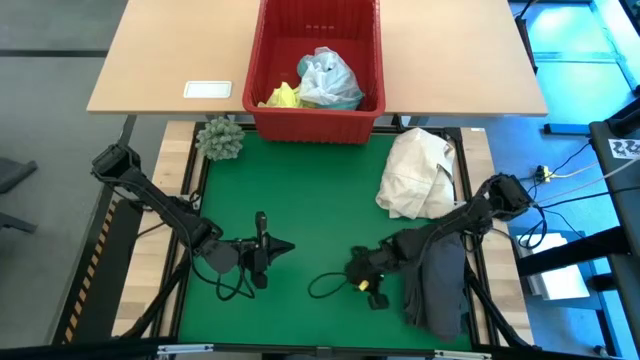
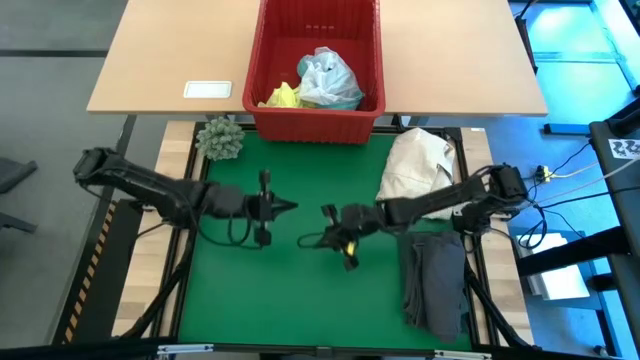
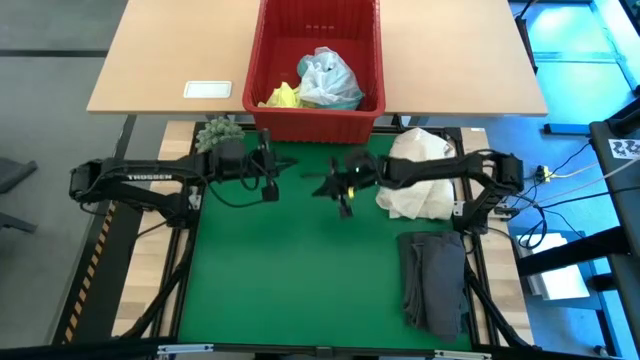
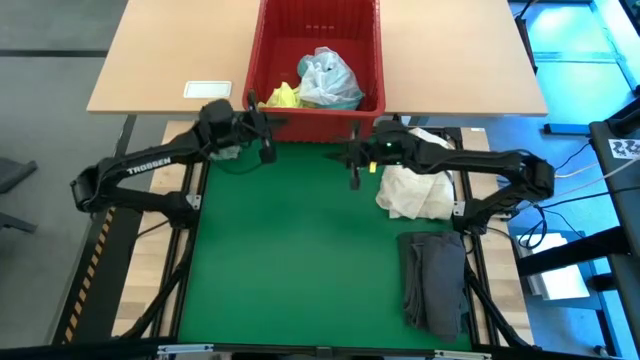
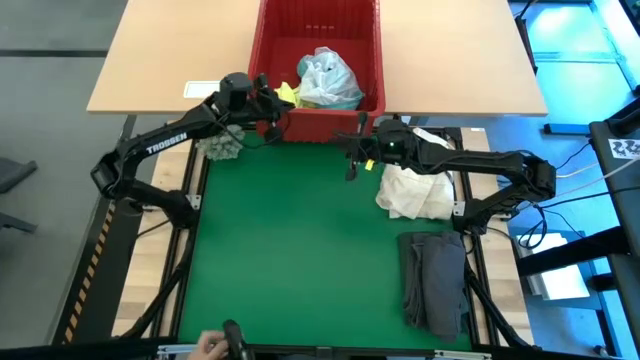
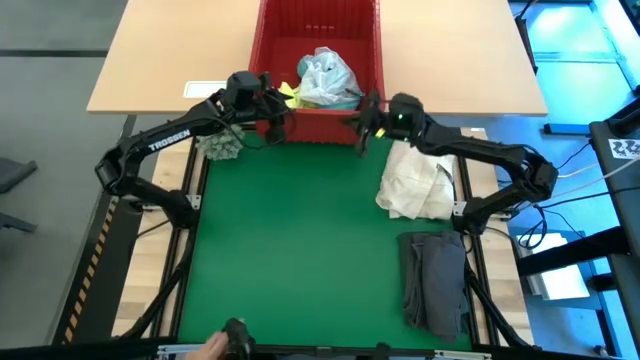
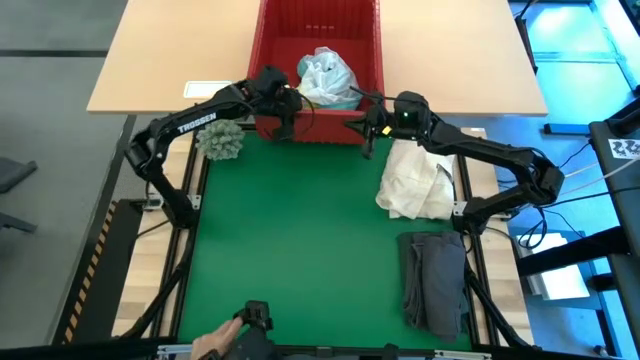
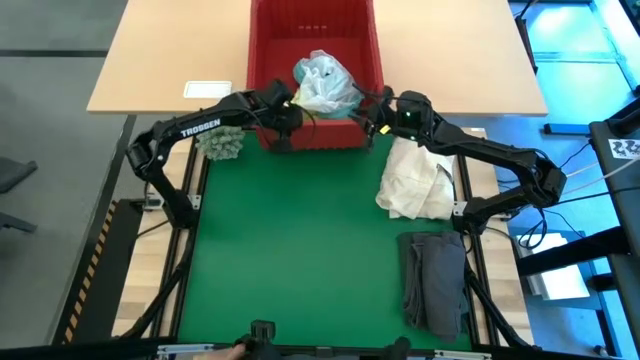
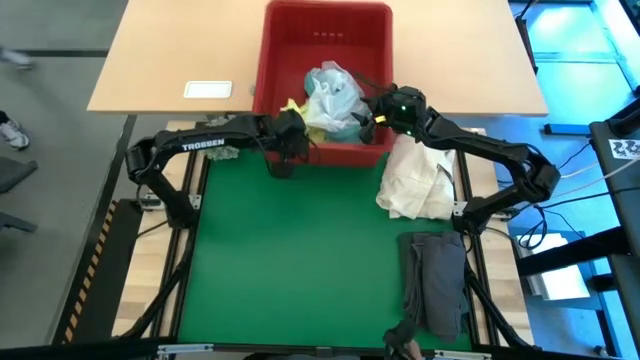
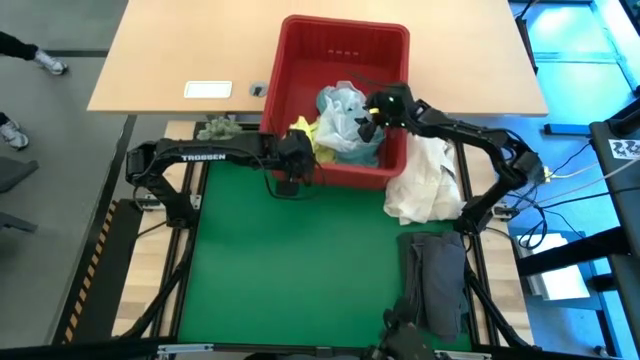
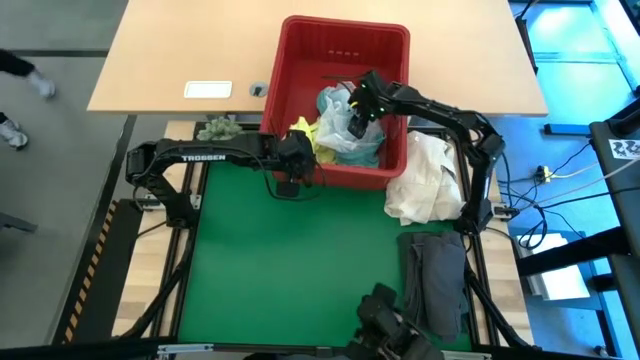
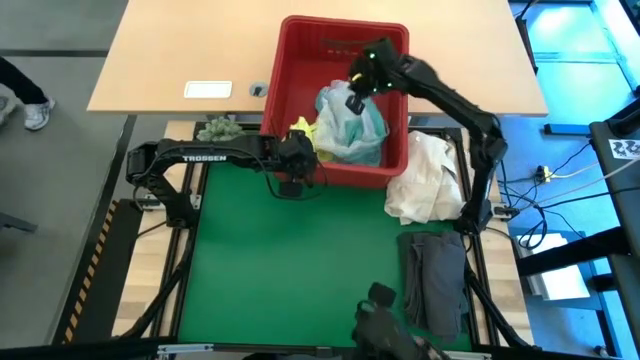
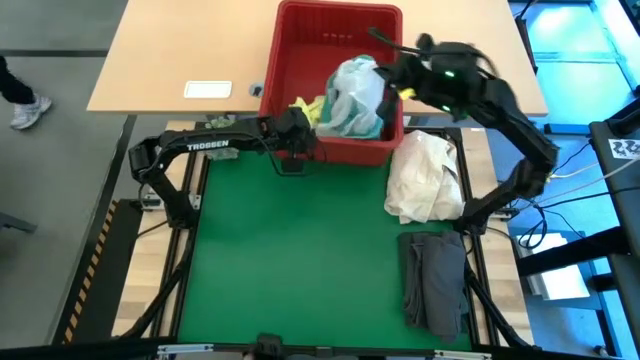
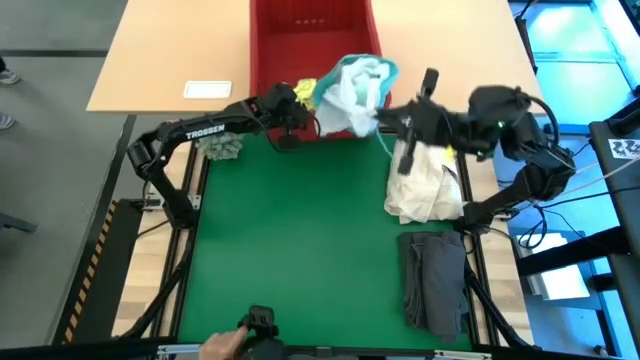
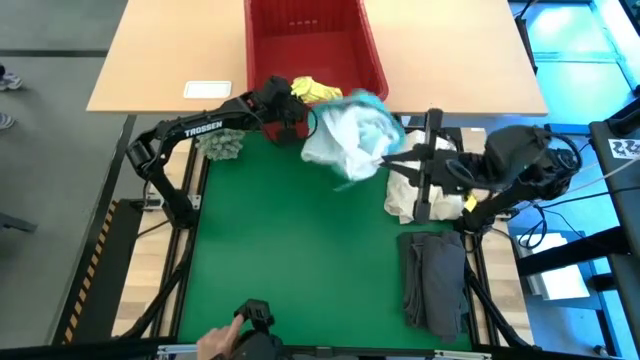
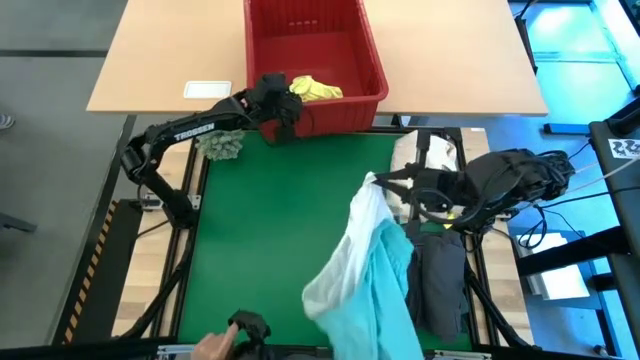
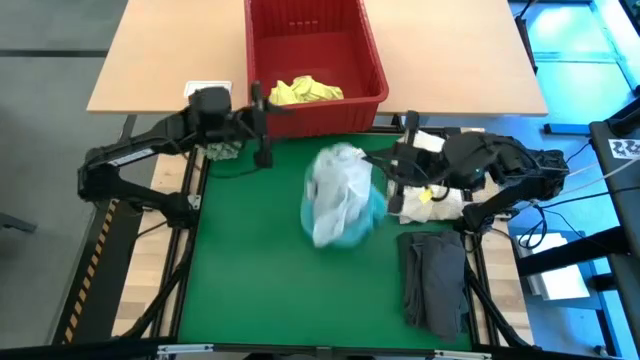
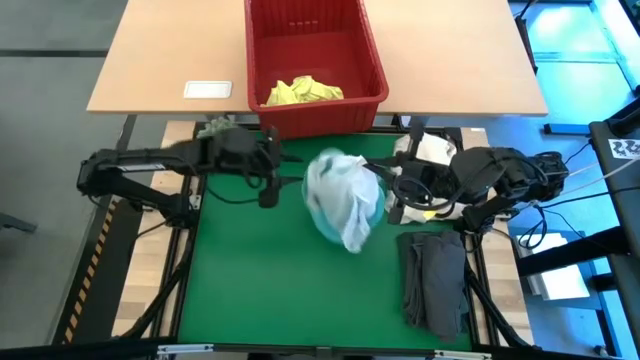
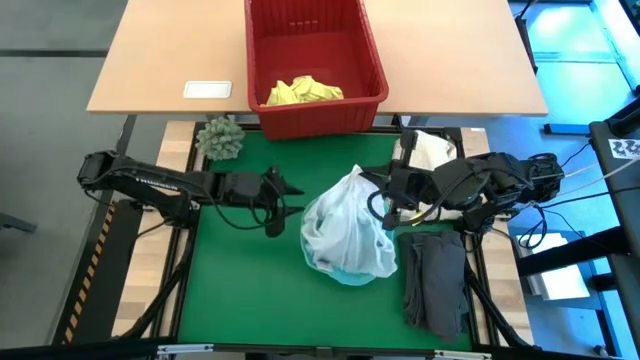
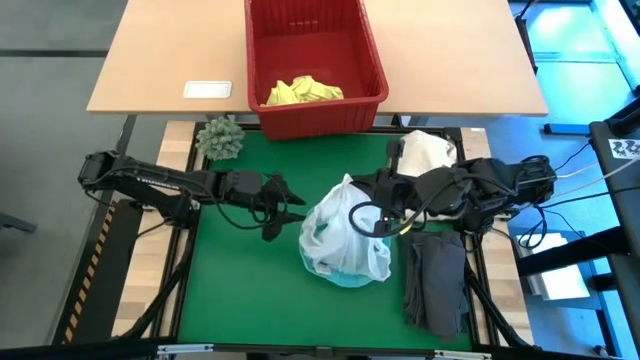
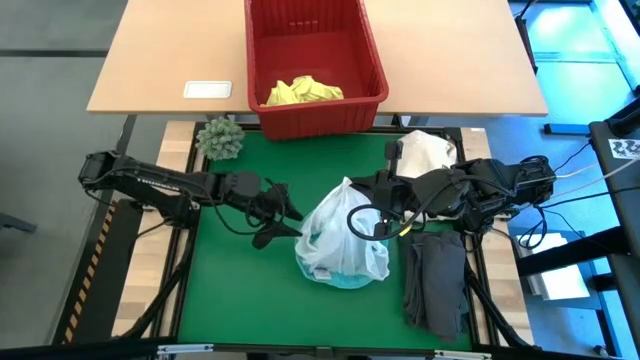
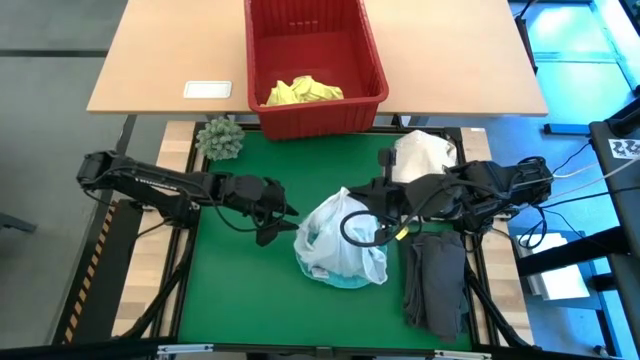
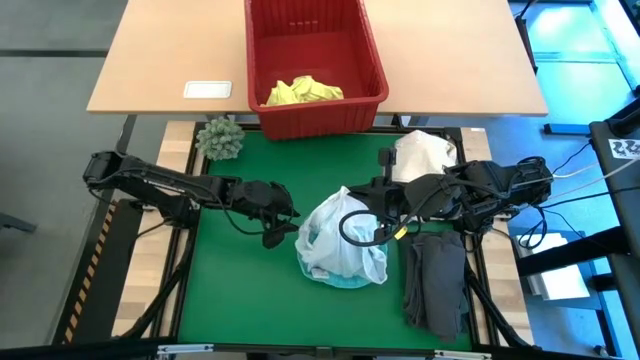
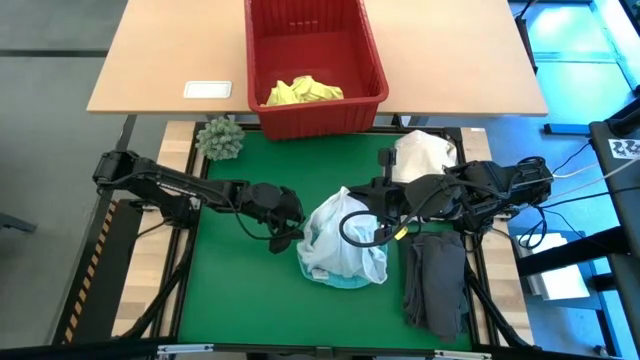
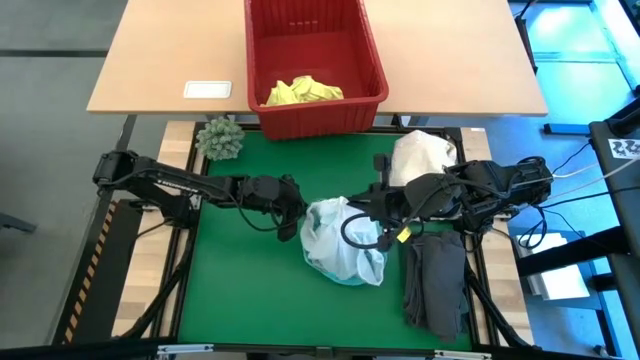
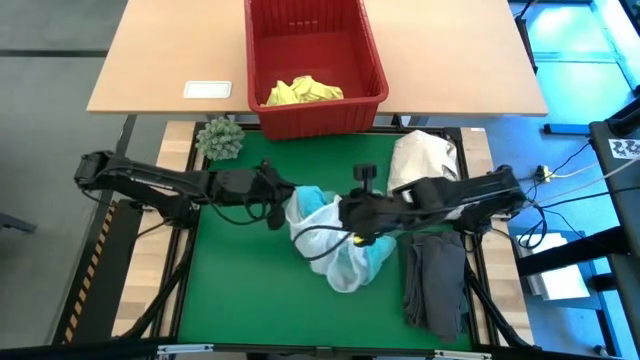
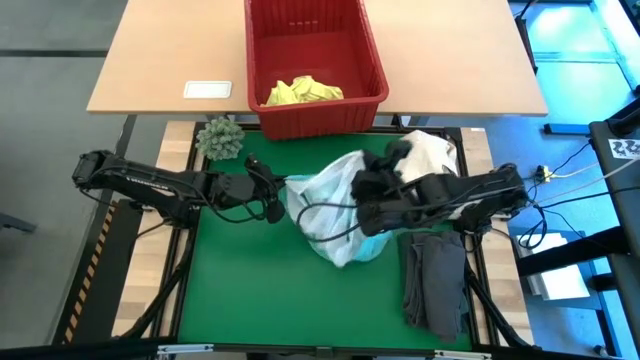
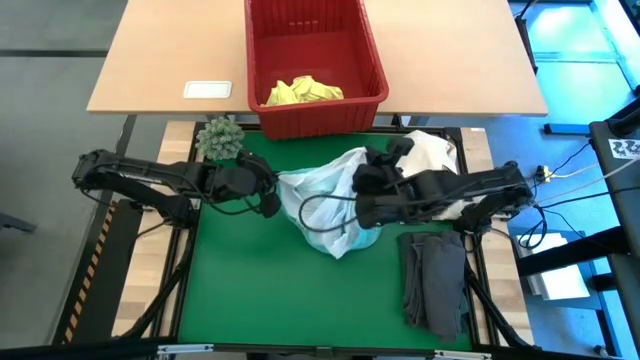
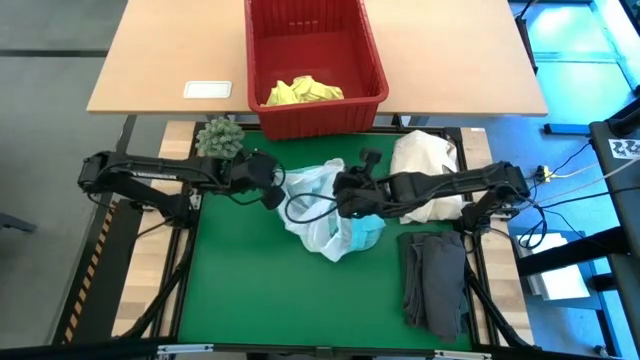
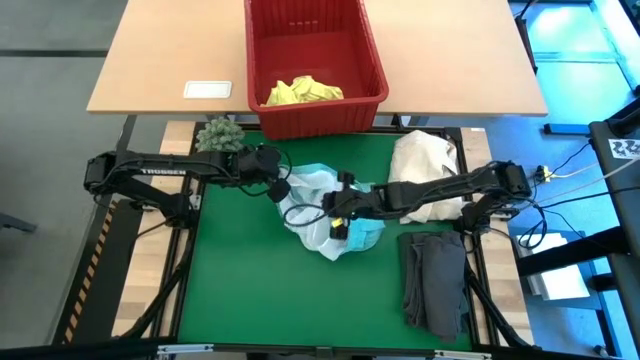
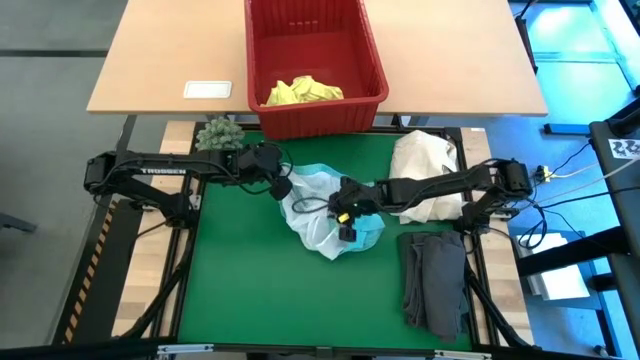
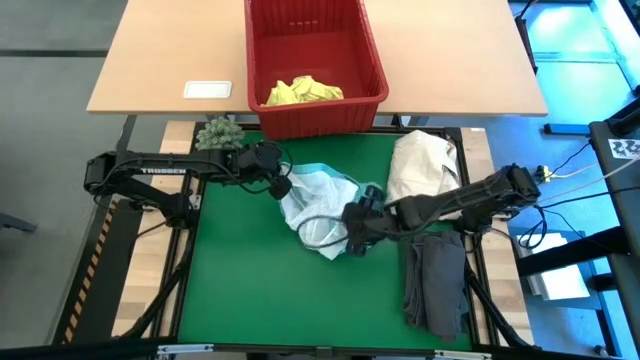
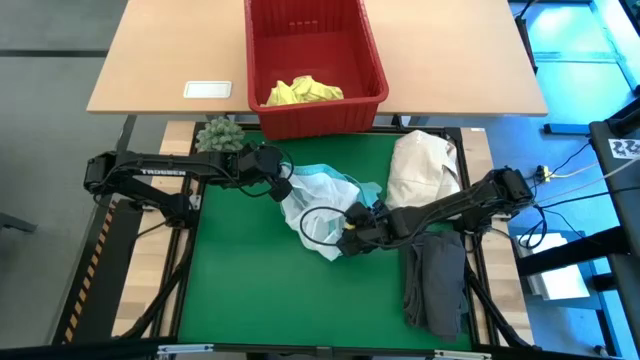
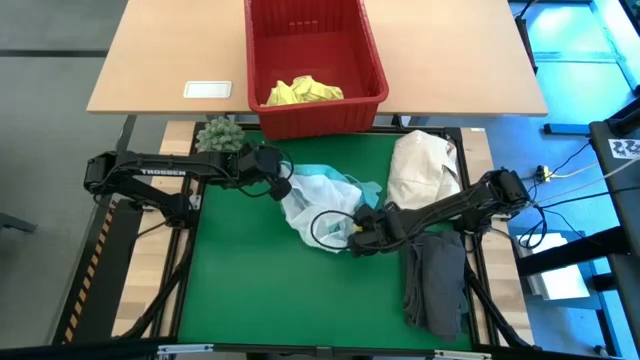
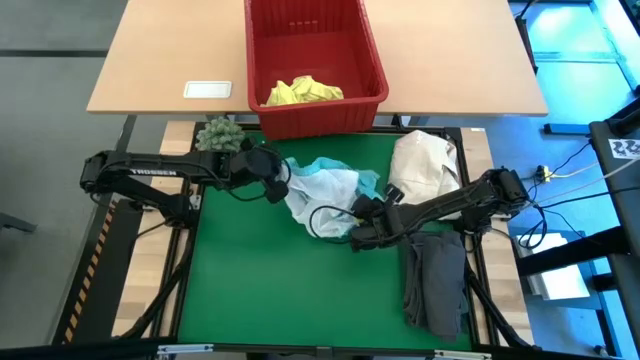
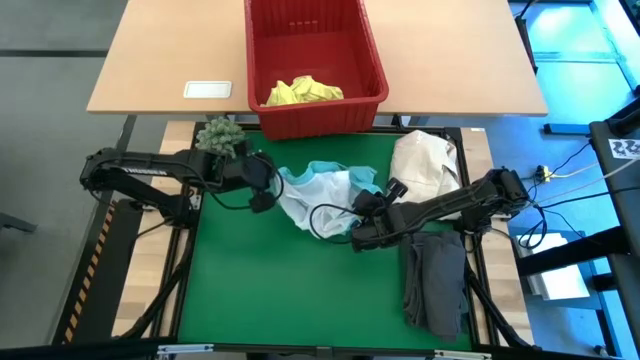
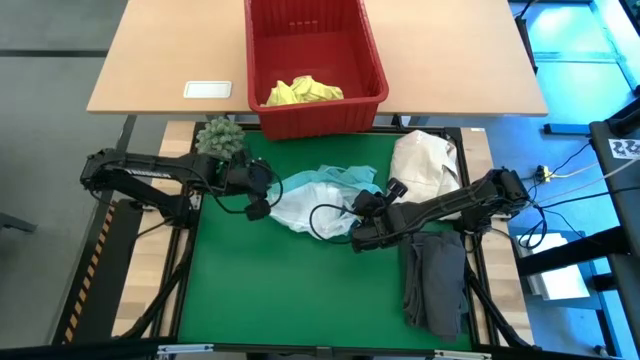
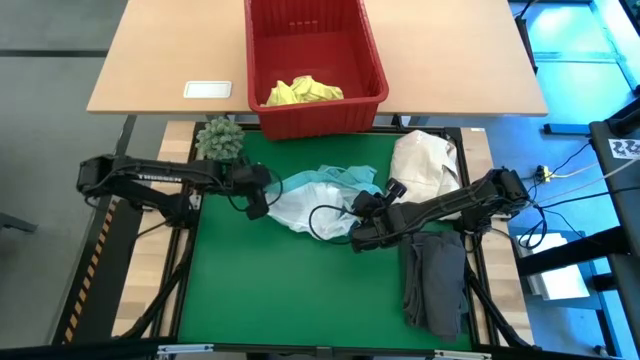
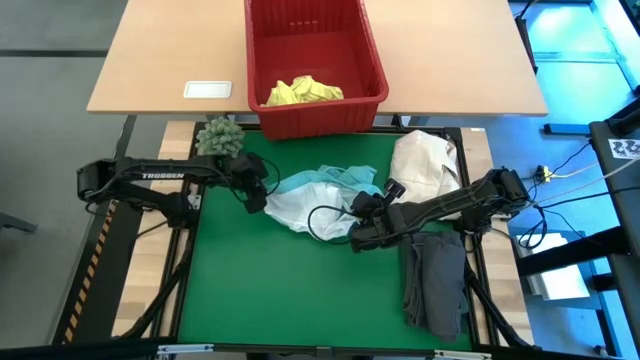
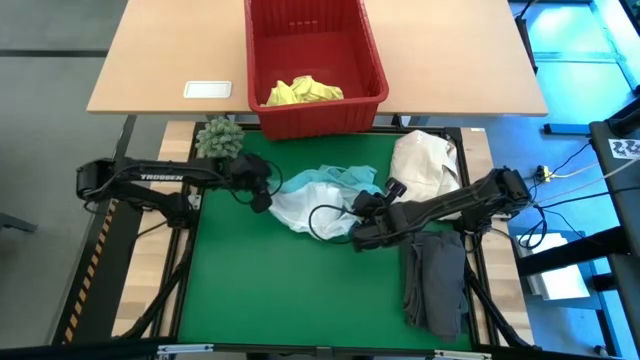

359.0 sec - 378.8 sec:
Task: Fold Laundry from Bin
Fold the blue short

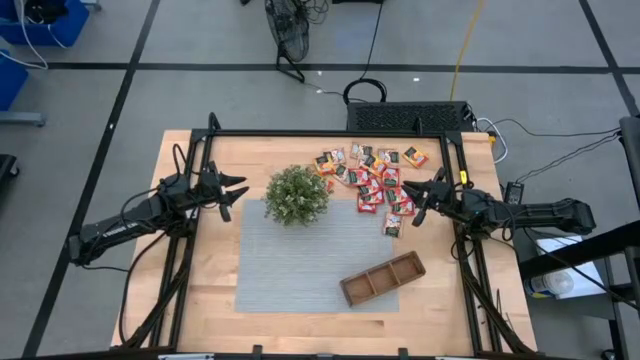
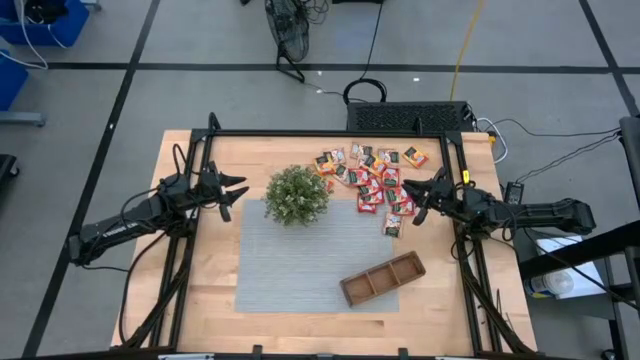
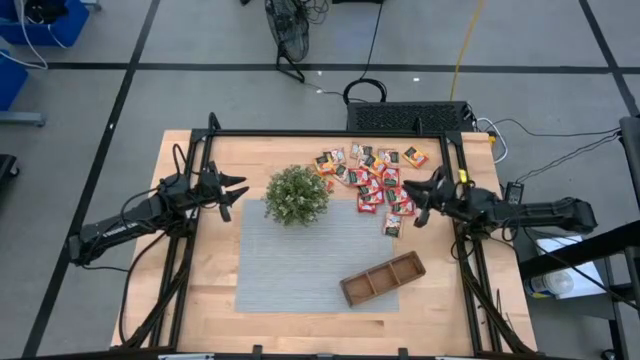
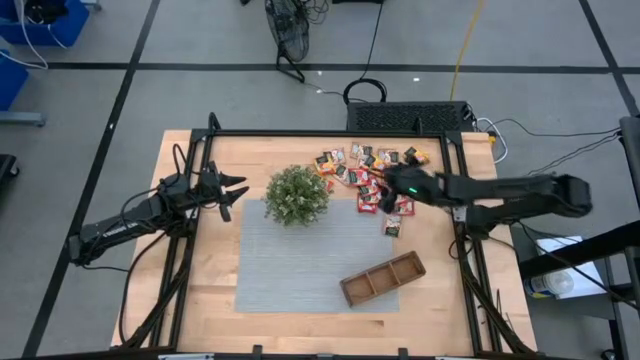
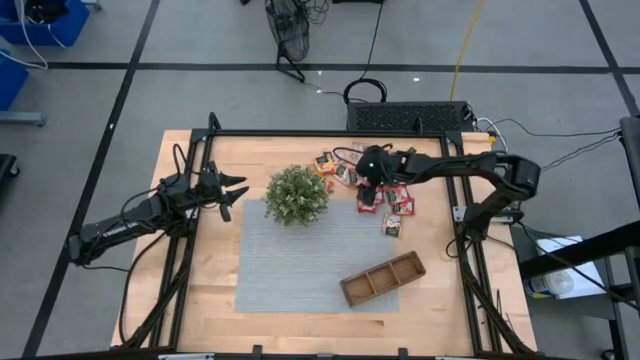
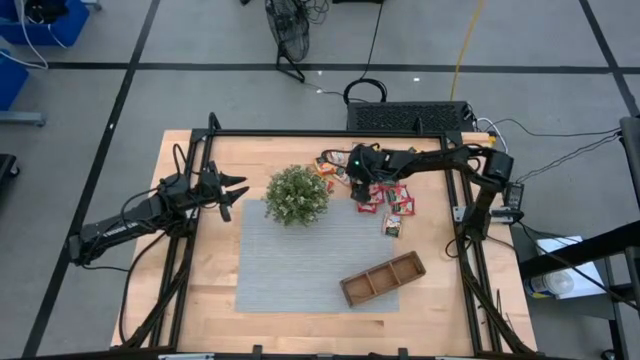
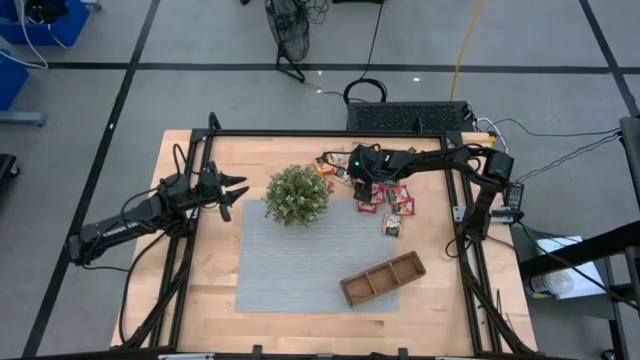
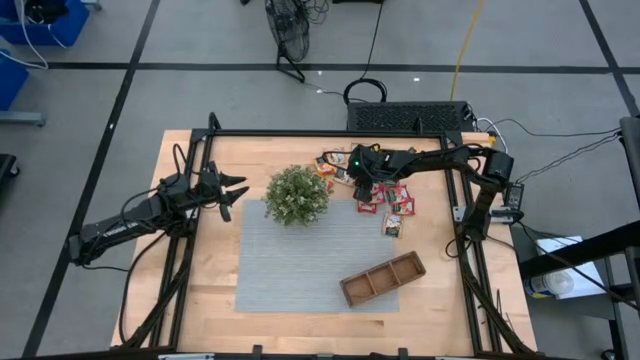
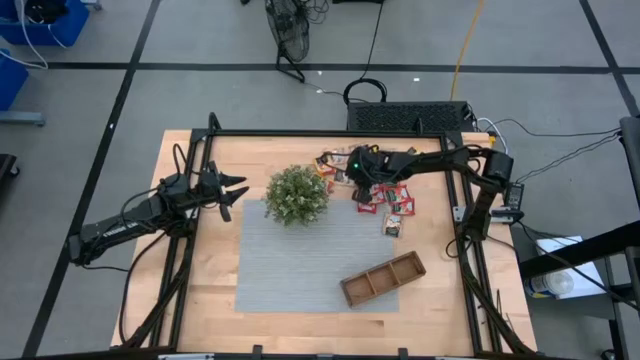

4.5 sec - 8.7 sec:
Task: Pick & Place Tea
Put the strawberry tea sachet into the brown organizer
